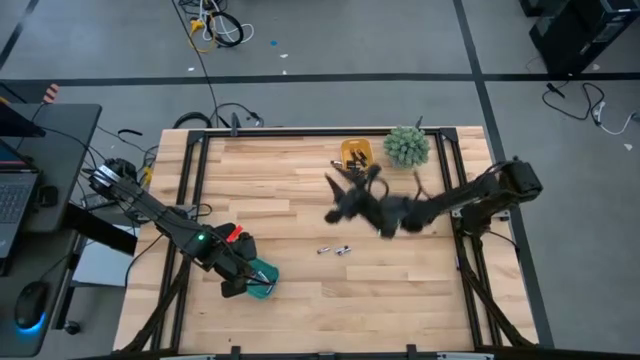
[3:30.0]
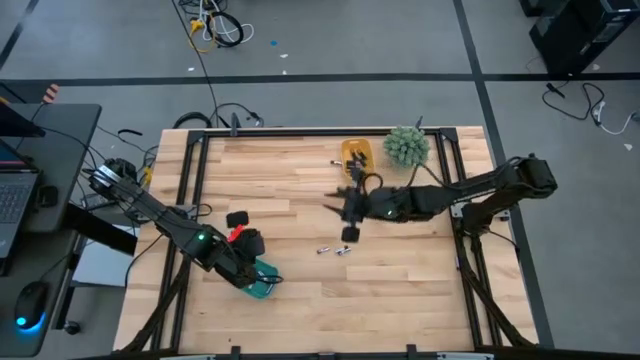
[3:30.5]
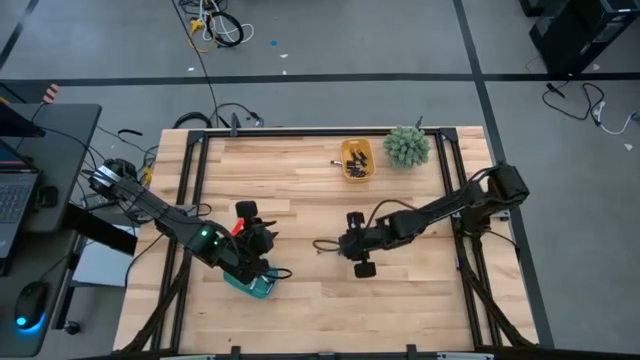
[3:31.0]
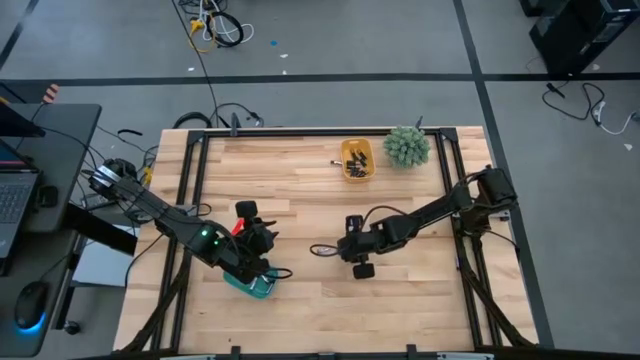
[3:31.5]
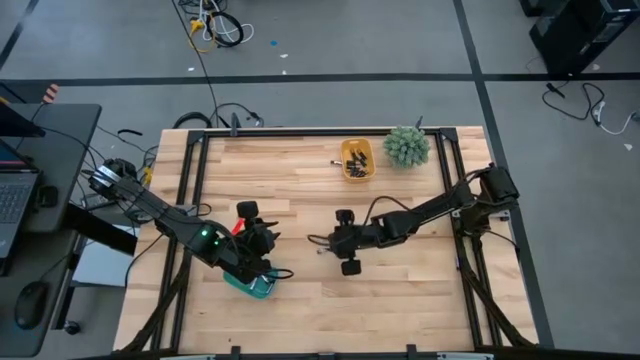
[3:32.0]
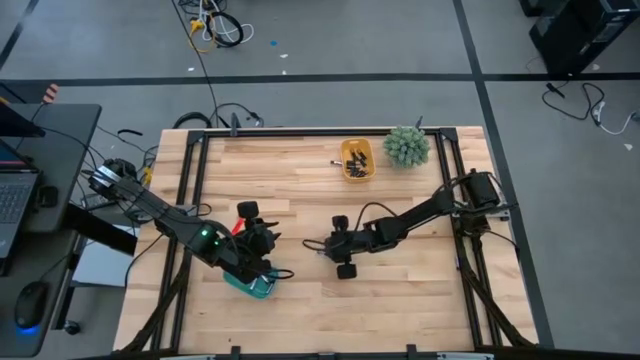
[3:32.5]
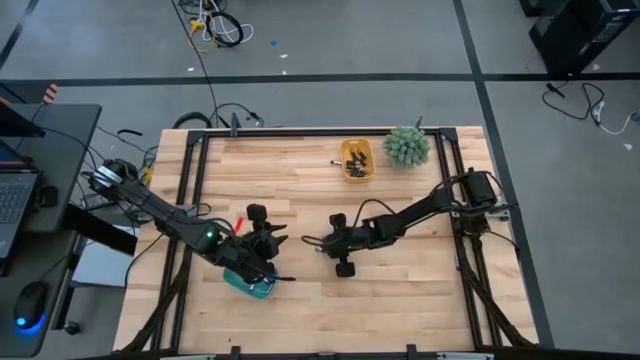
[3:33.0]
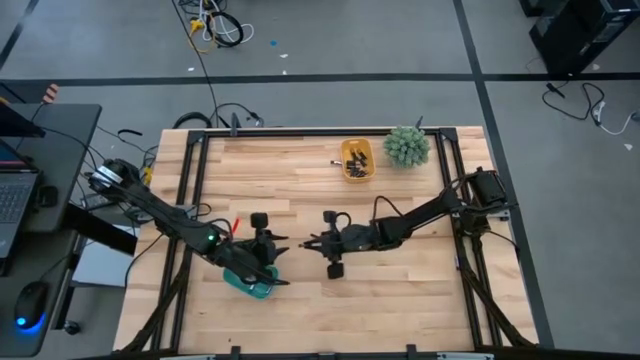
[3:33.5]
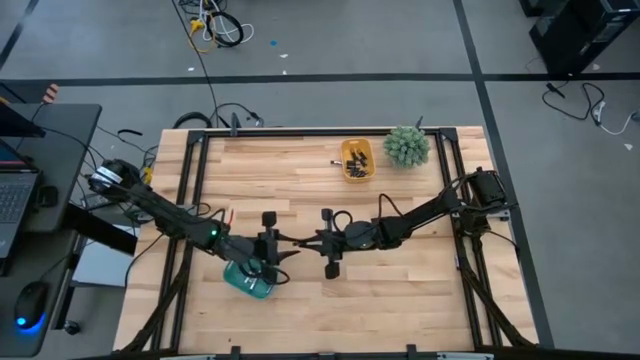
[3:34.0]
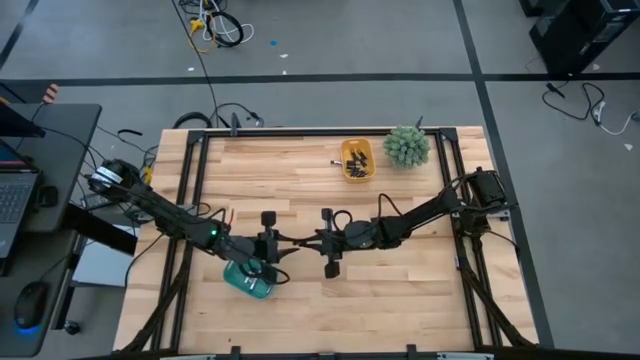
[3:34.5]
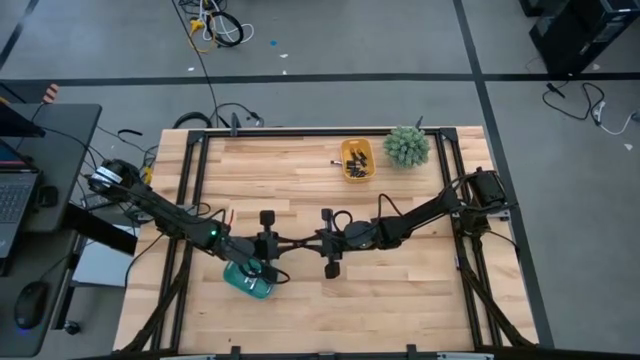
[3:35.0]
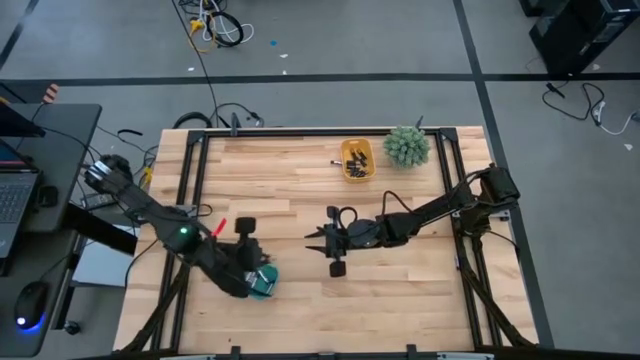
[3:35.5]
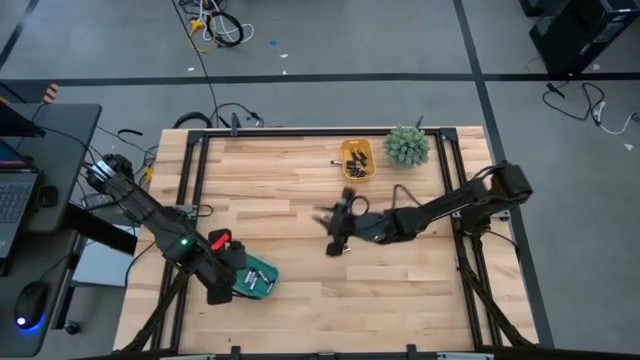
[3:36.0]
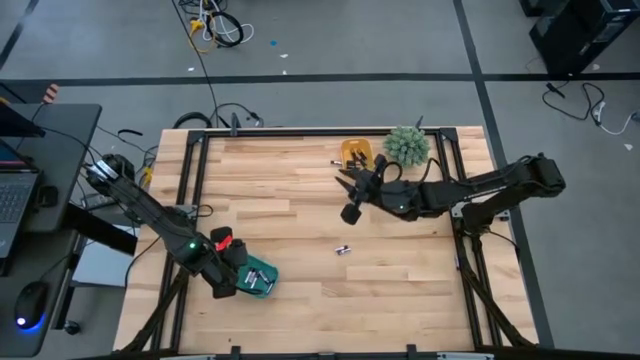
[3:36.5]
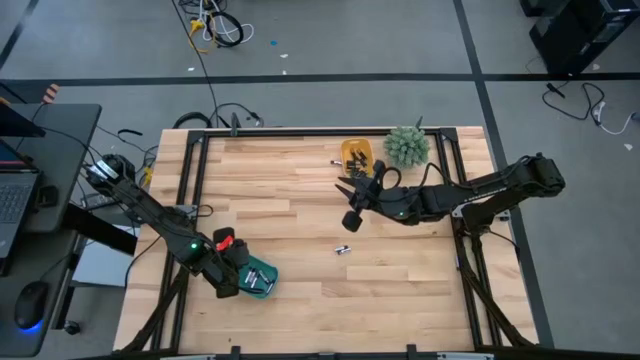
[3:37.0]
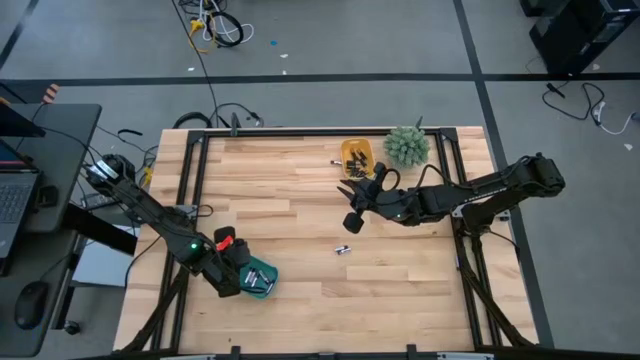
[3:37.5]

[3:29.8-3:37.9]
Task: Sort batteries
Put the silver battery into the green bin

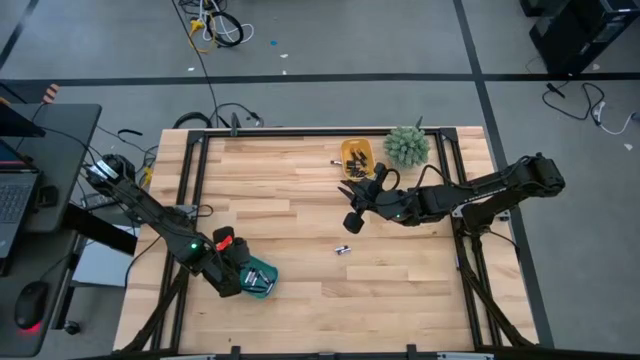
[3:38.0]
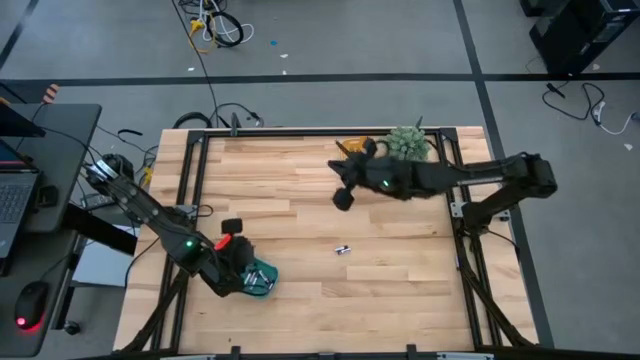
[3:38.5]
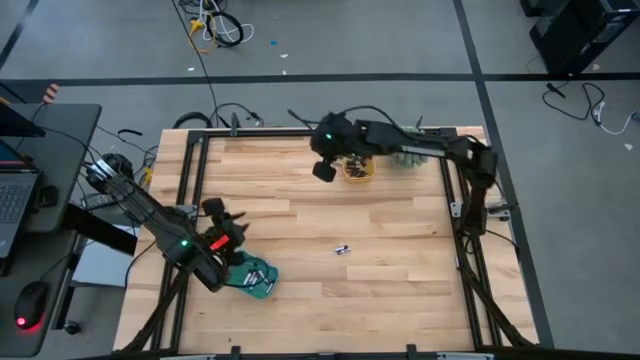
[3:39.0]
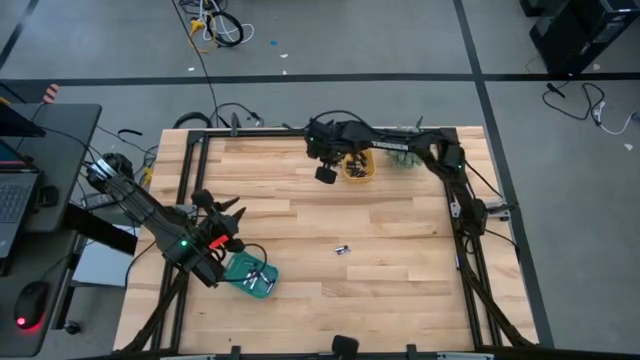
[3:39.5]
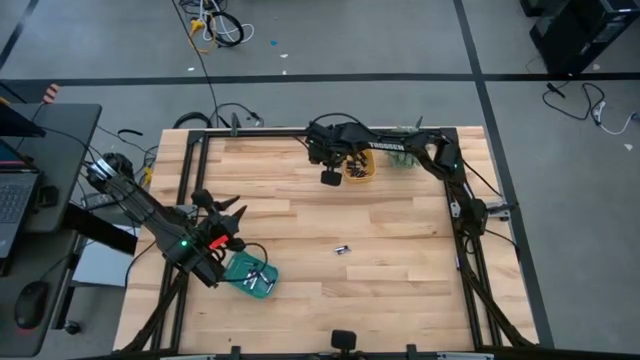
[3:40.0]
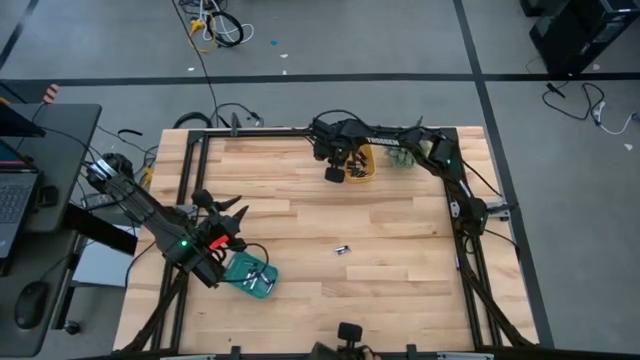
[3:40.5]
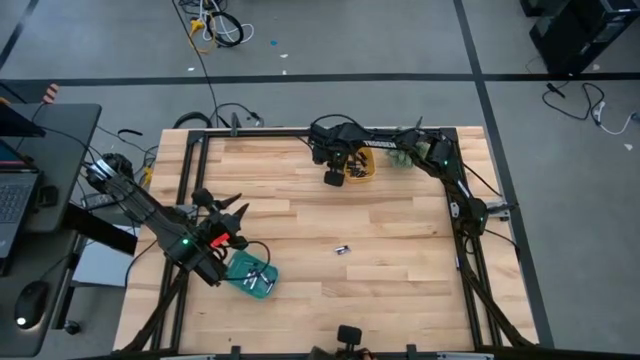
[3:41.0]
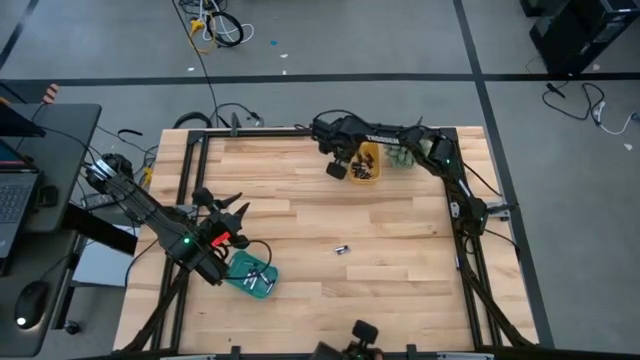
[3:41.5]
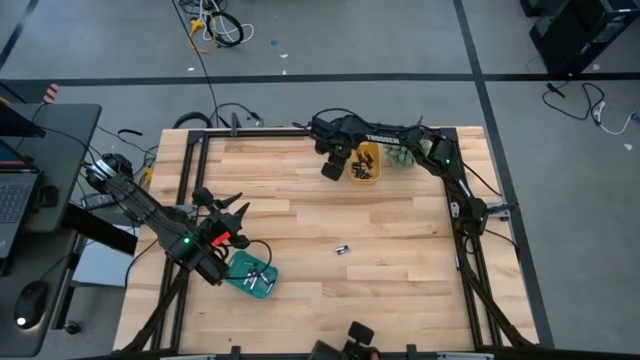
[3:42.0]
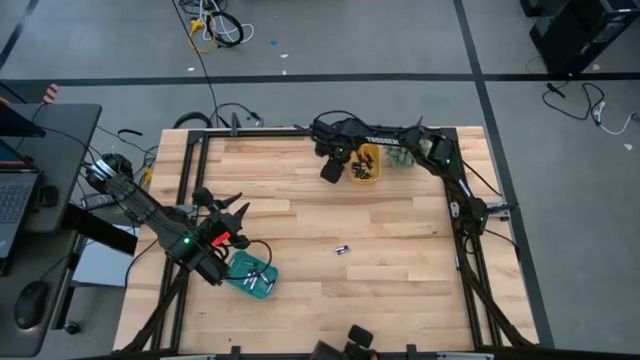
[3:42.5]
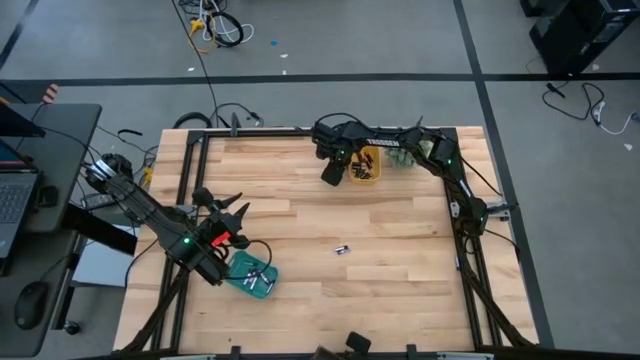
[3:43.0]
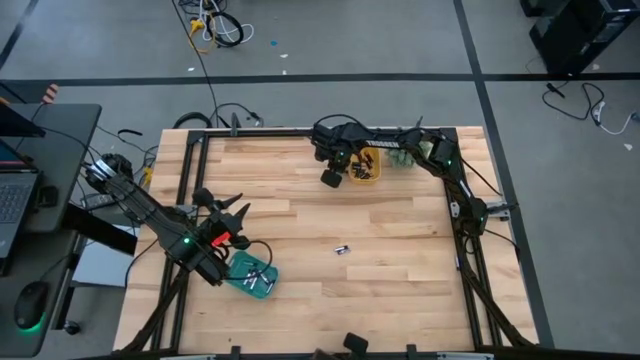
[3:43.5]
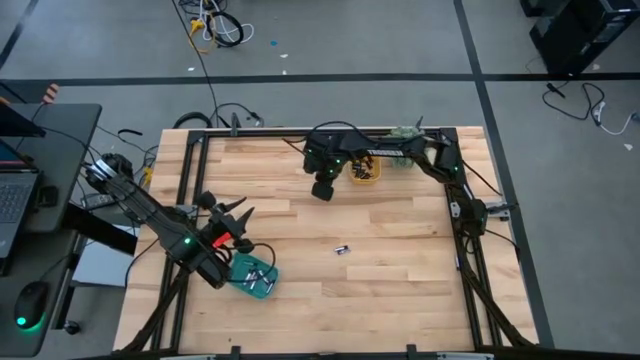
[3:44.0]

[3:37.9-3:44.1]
Put the silver battery into the green bin

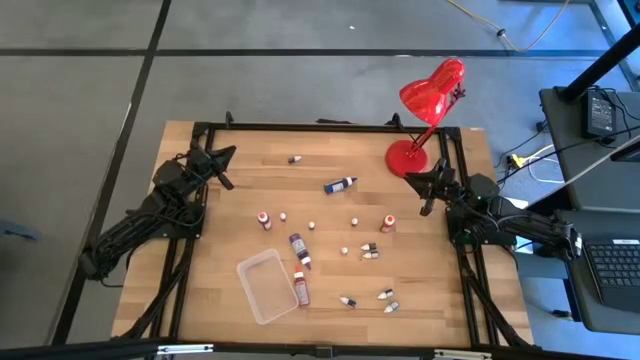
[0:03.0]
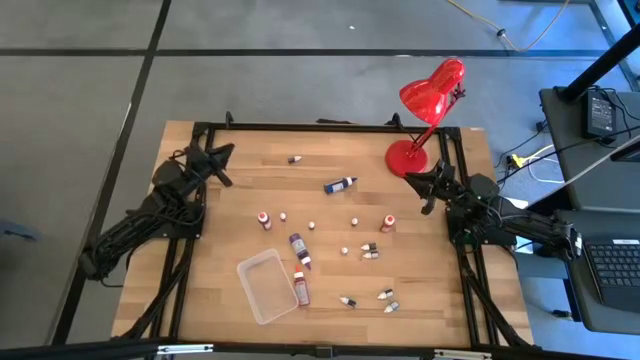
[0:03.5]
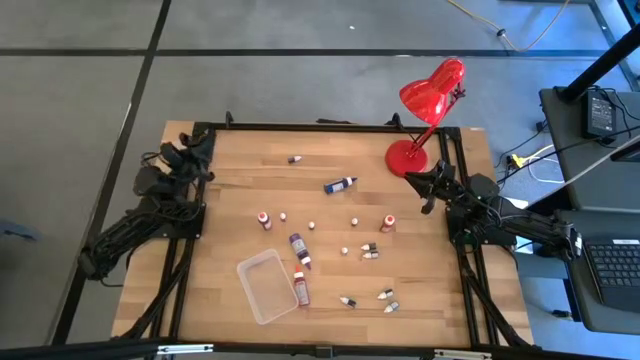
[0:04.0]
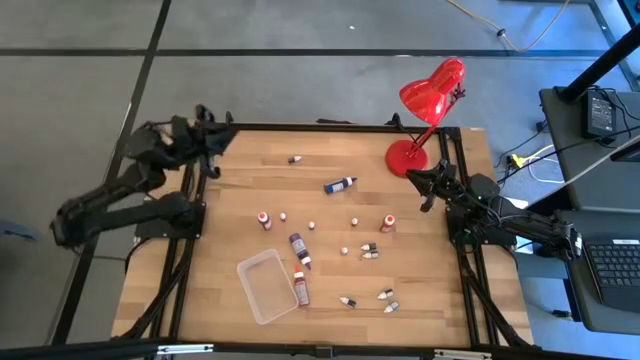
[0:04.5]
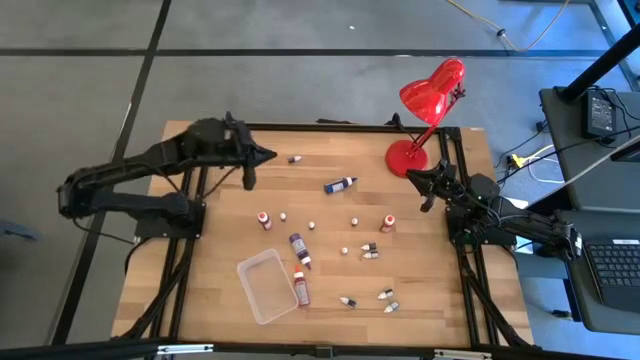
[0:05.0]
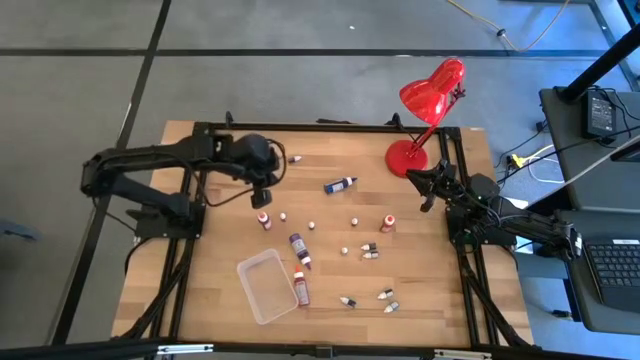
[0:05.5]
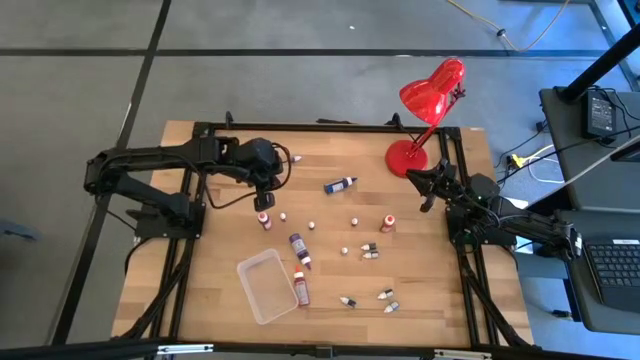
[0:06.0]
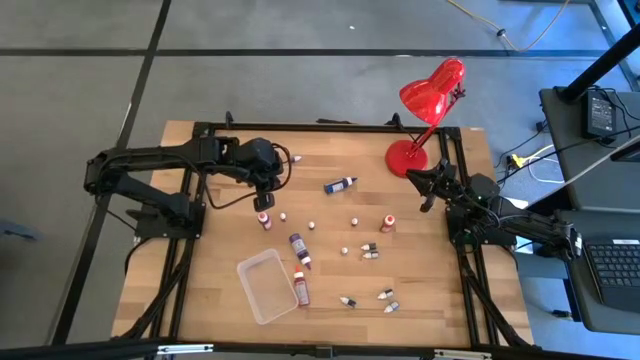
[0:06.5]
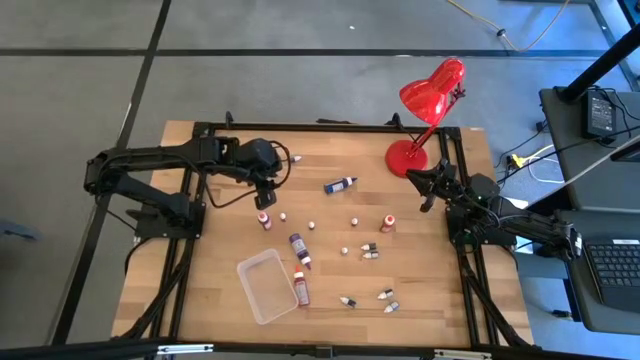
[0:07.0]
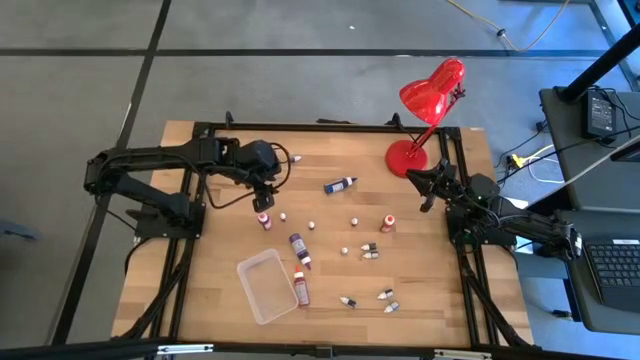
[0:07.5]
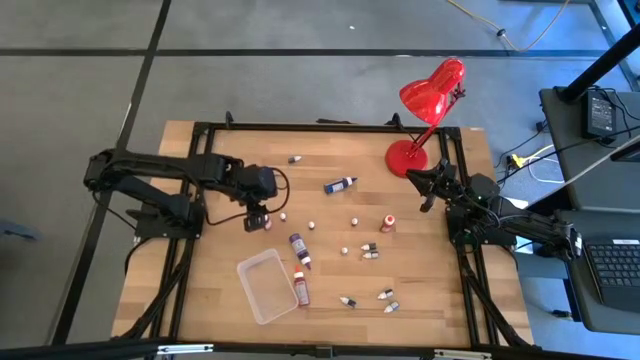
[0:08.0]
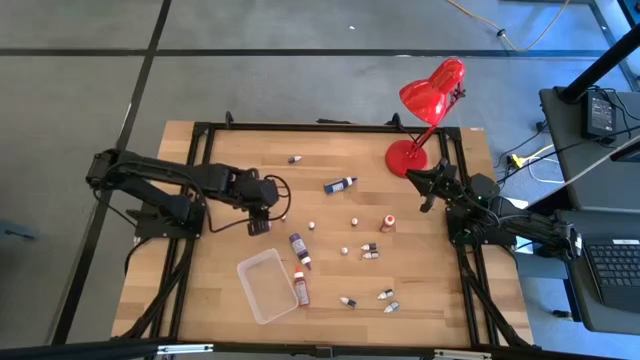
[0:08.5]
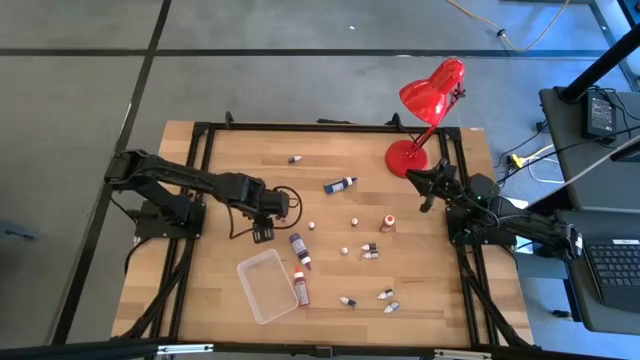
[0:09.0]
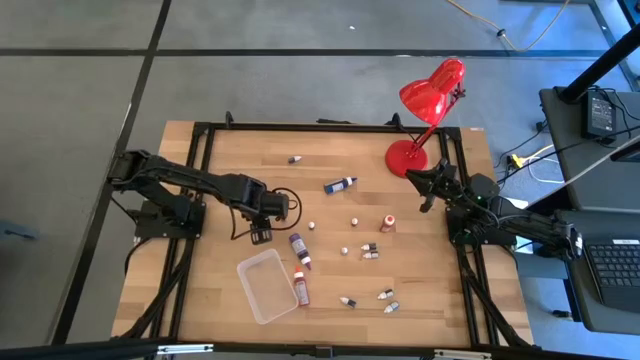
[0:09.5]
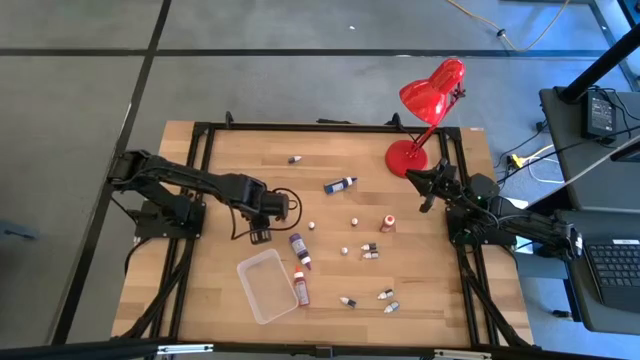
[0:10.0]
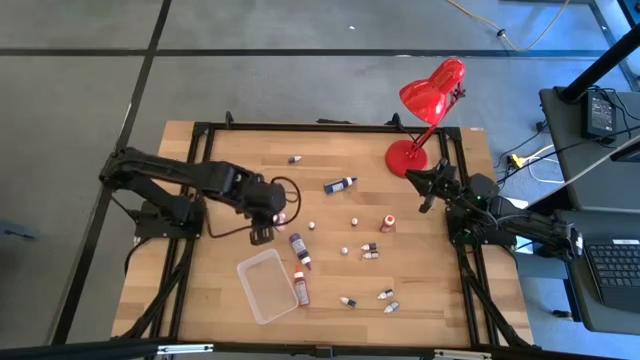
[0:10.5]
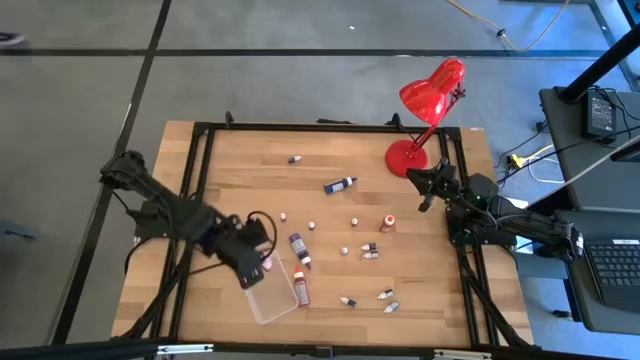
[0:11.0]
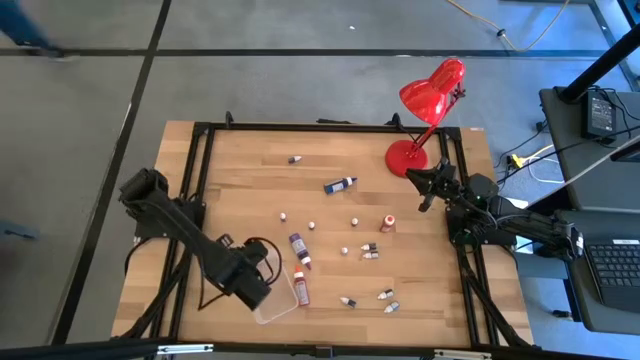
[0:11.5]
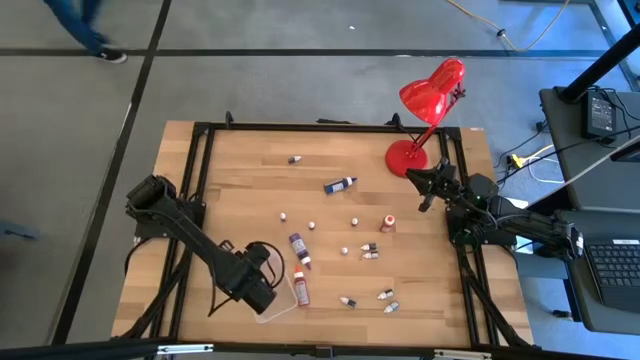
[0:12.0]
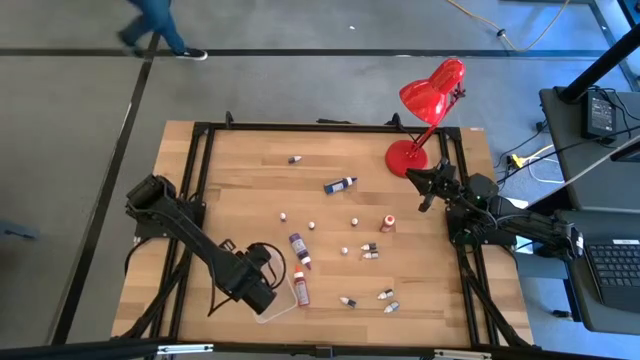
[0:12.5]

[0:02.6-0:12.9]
Task: Pick & Place food coloring
Put the pink food coloring bottle into the transparent bin
